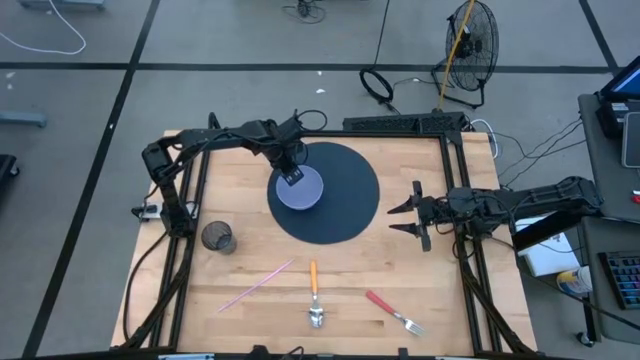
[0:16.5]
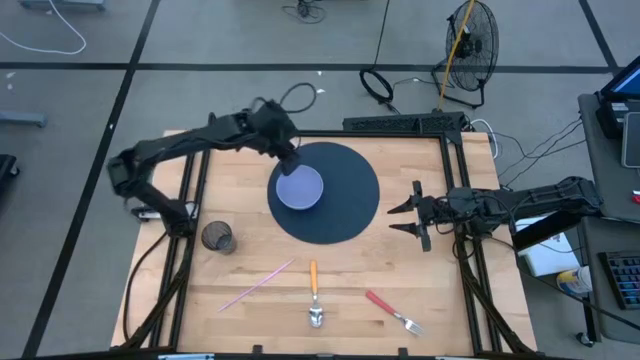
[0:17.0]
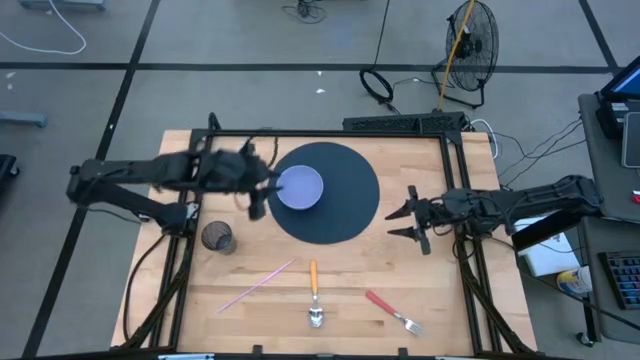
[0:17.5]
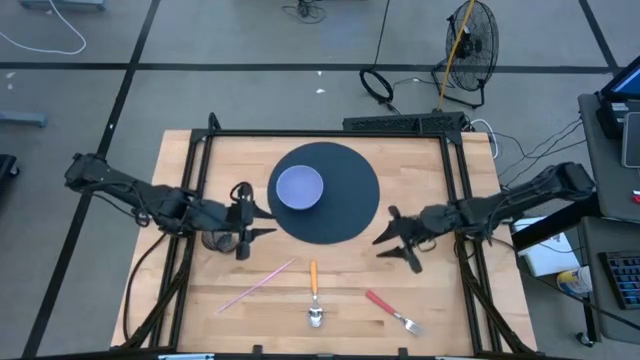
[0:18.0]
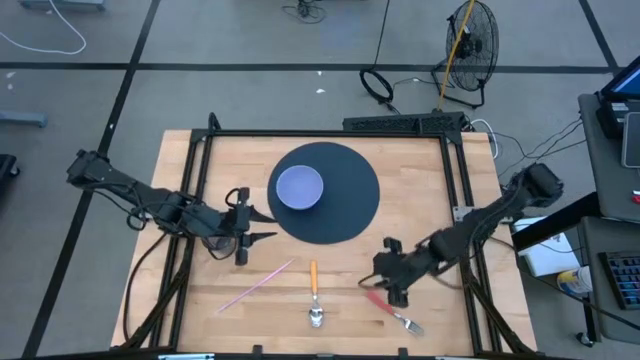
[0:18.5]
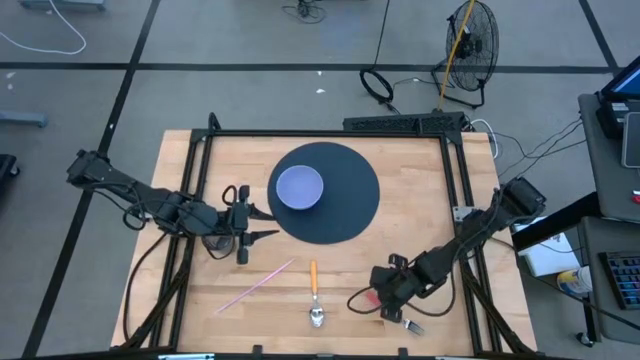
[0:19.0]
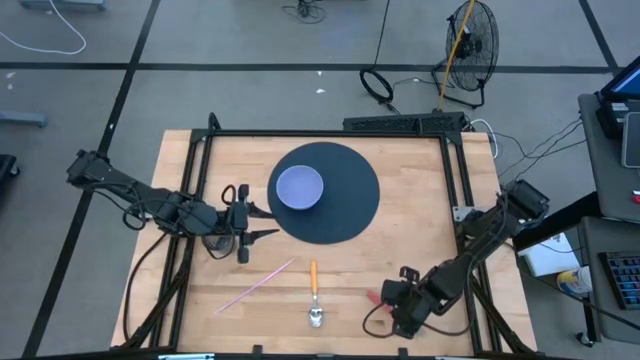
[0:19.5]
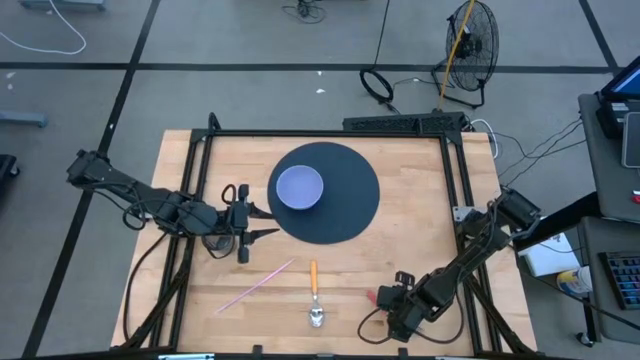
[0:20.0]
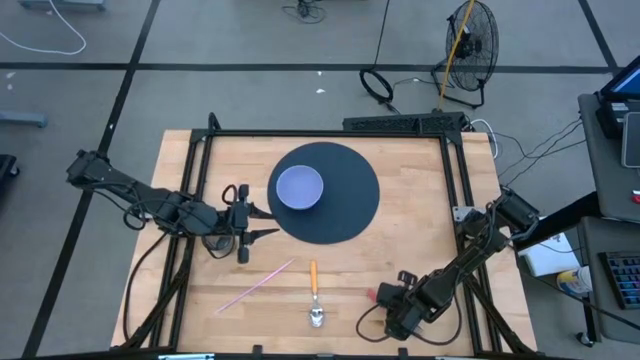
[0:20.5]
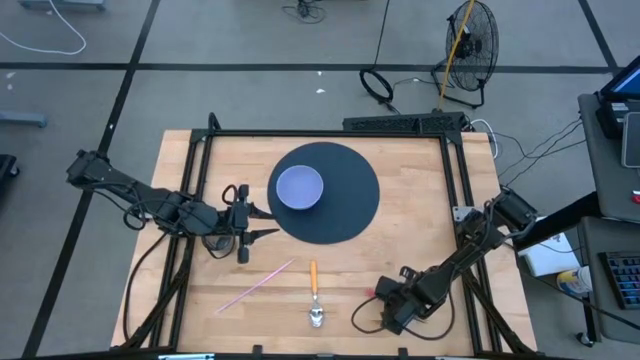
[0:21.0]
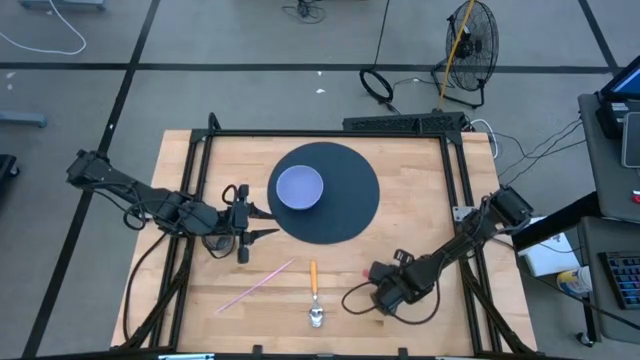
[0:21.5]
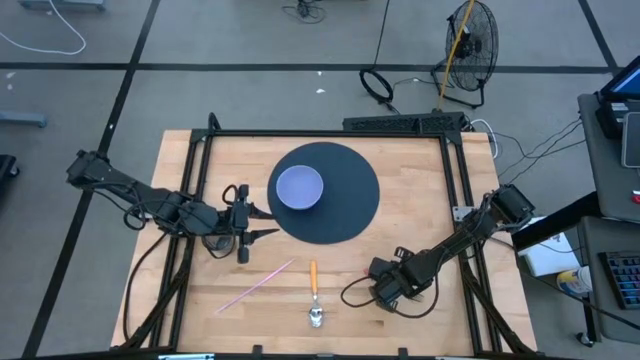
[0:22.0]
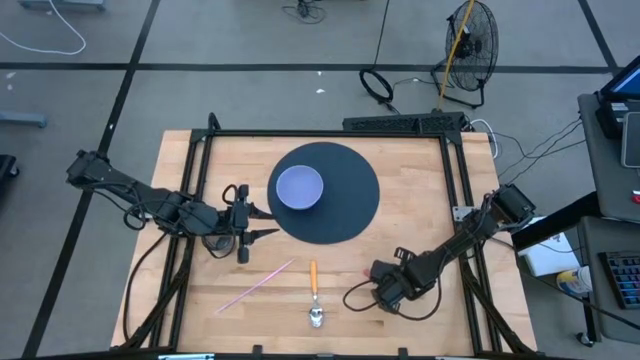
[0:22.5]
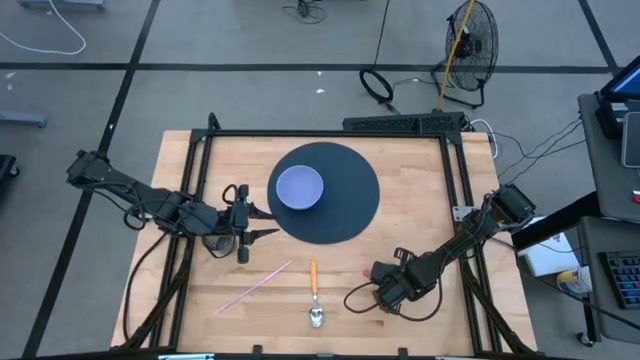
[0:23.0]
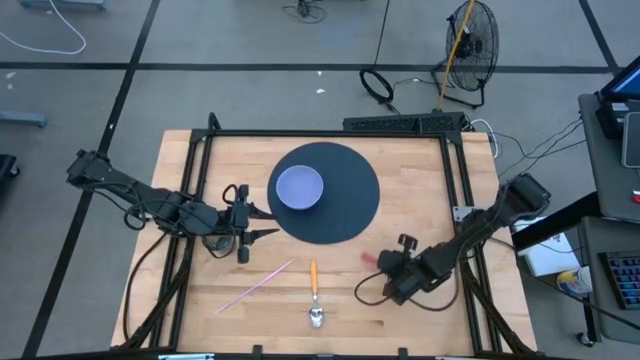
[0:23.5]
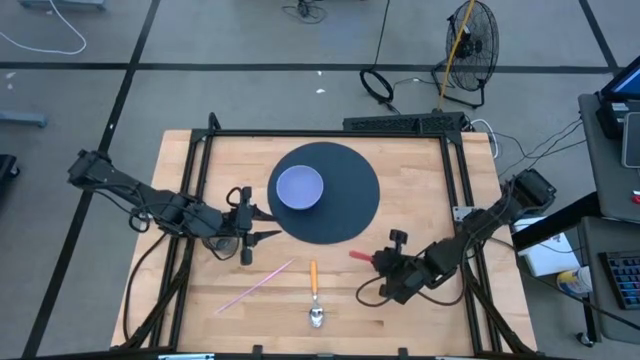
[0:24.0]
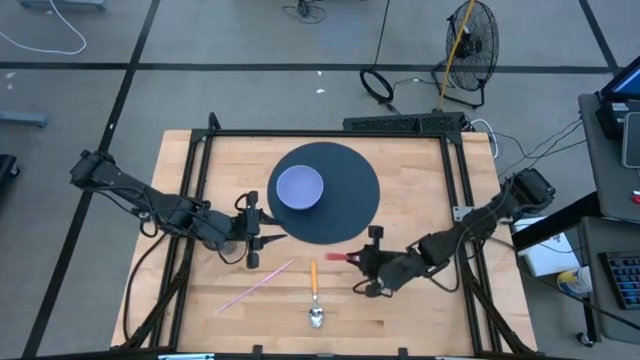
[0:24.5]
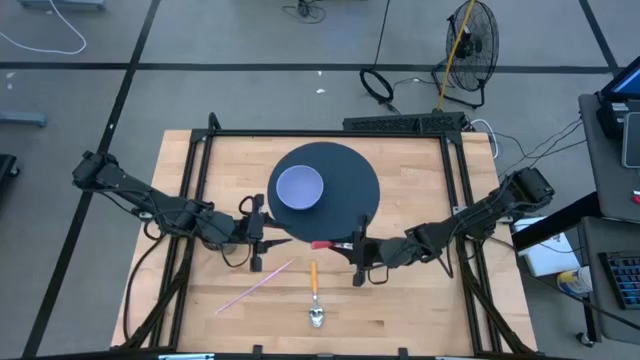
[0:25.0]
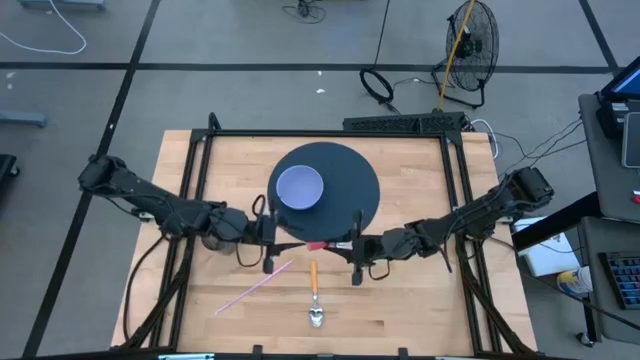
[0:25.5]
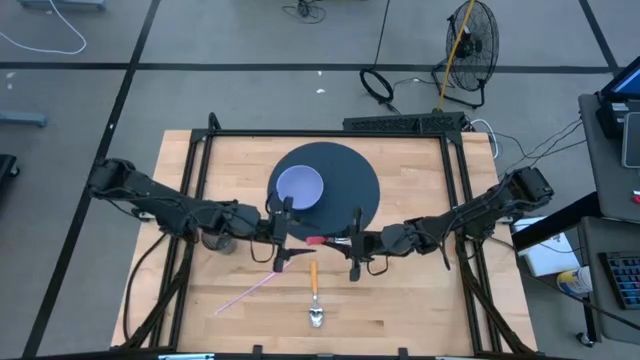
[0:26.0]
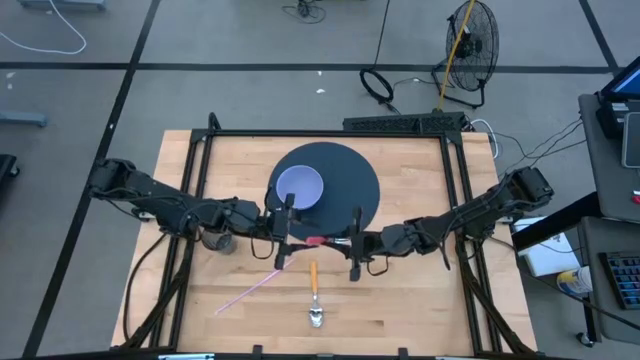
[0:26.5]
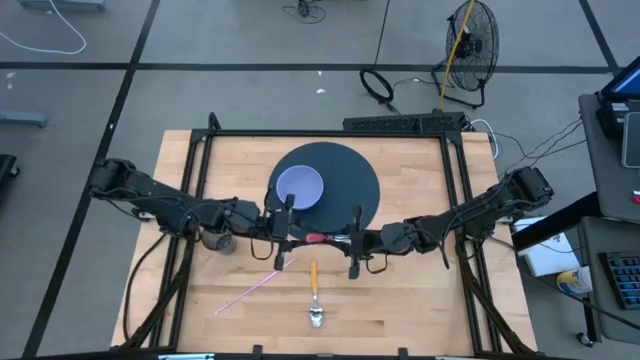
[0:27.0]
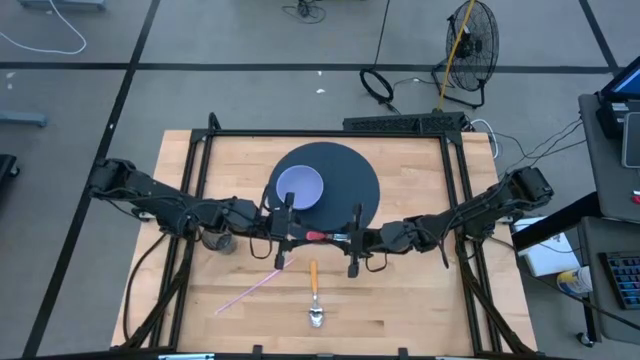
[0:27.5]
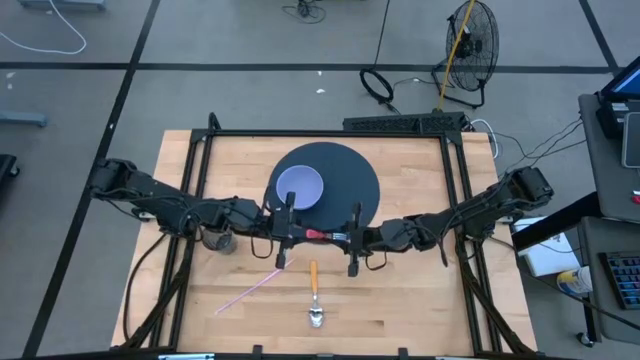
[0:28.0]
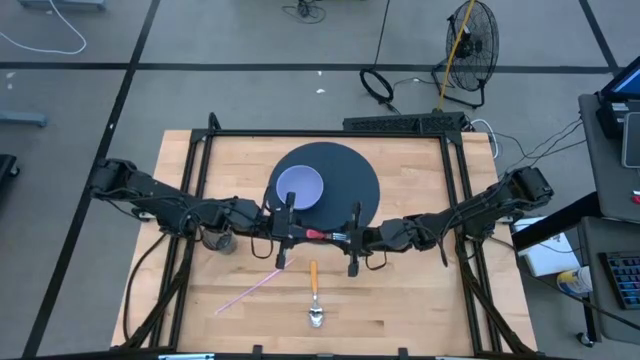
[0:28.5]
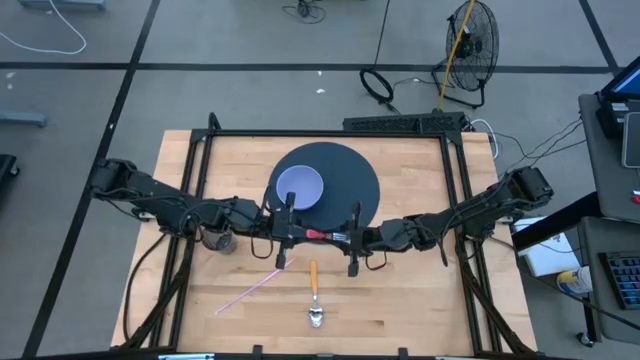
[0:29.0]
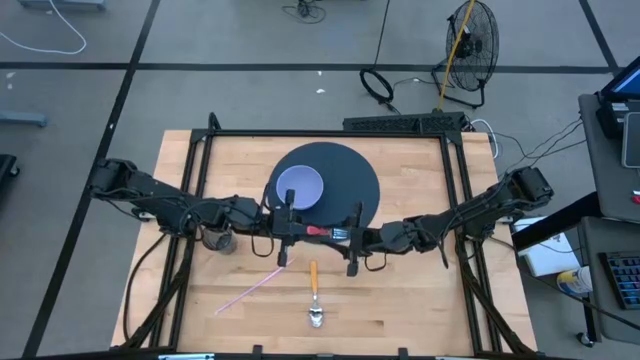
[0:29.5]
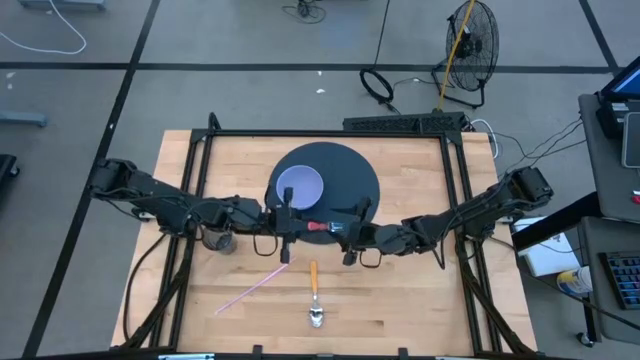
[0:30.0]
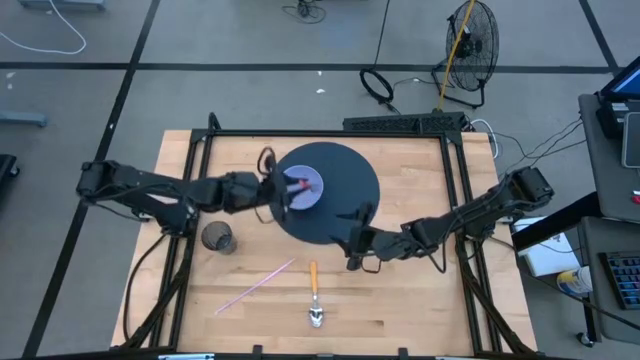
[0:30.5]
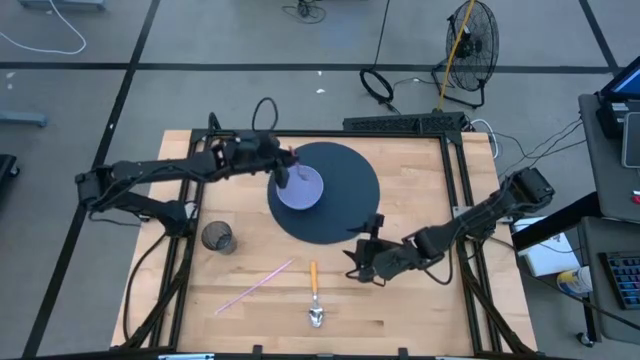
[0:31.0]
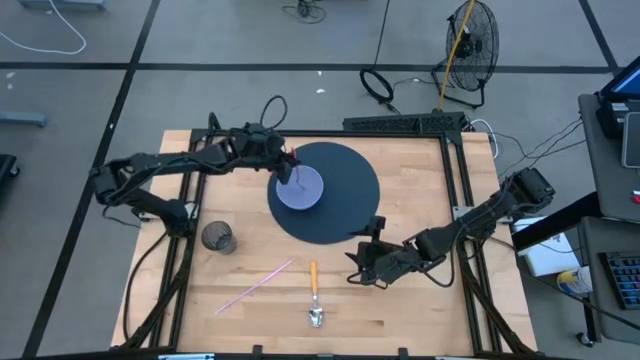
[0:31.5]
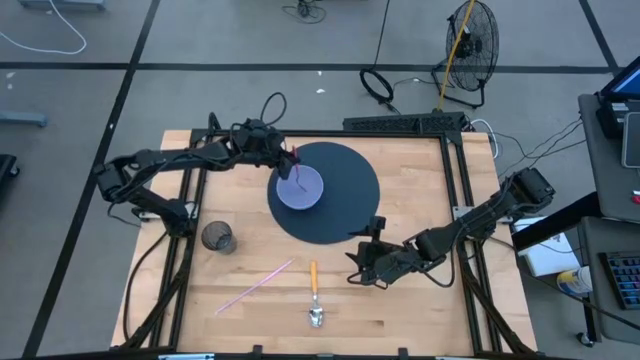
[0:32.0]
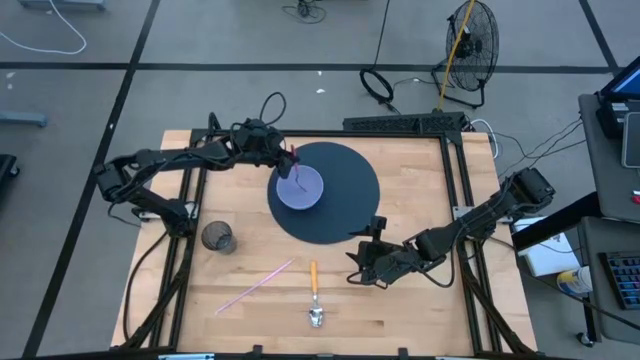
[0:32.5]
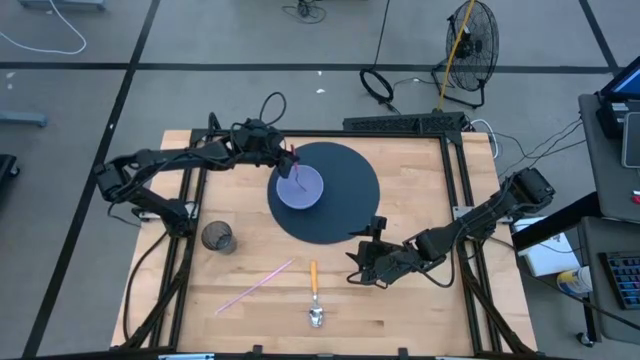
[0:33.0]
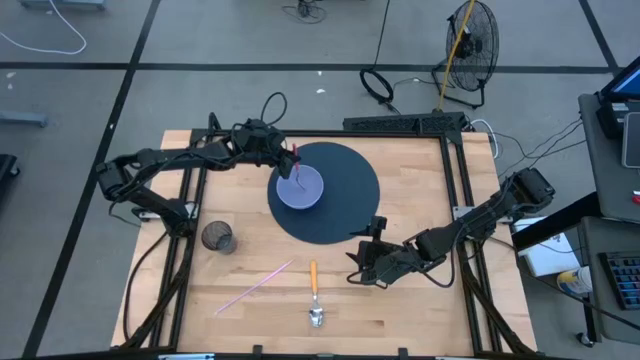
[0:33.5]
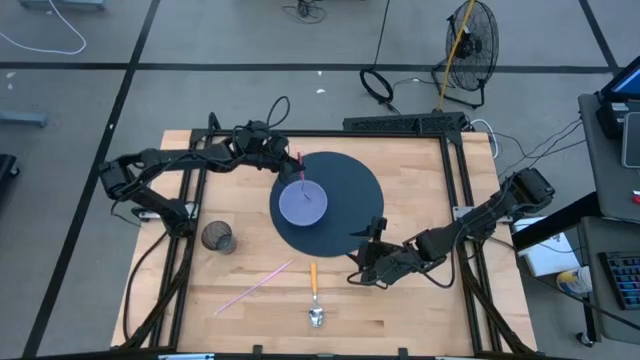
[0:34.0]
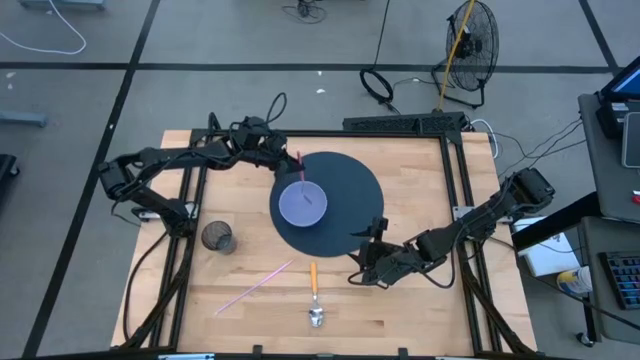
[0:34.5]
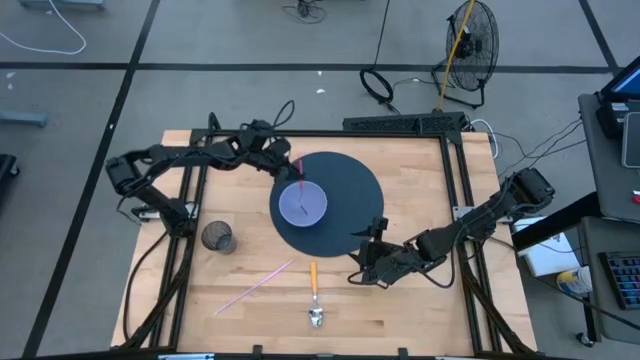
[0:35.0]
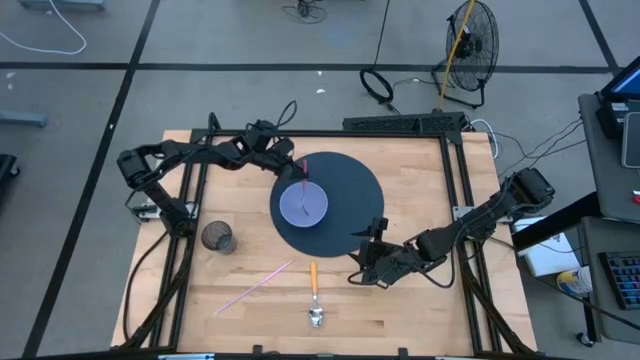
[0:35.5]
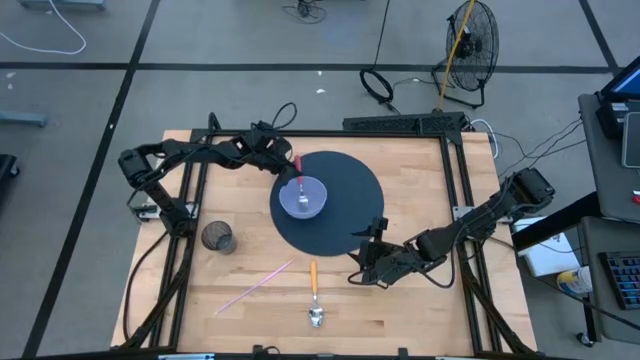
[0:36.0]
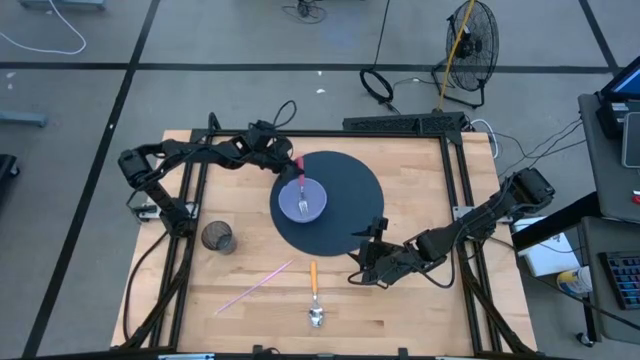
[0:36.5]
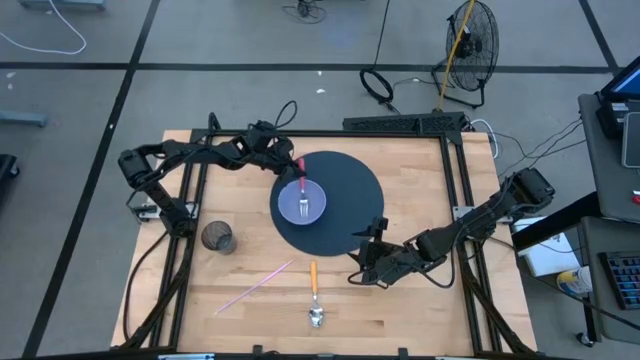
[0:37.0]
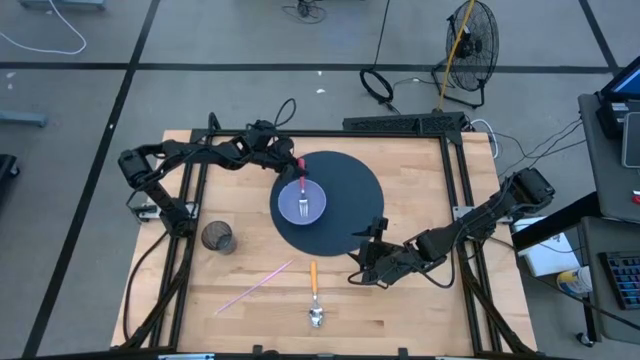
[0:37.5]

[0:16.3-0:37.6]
Task: Pick & Place Utensil
Put the pink fork into the purple bowl on the mat
